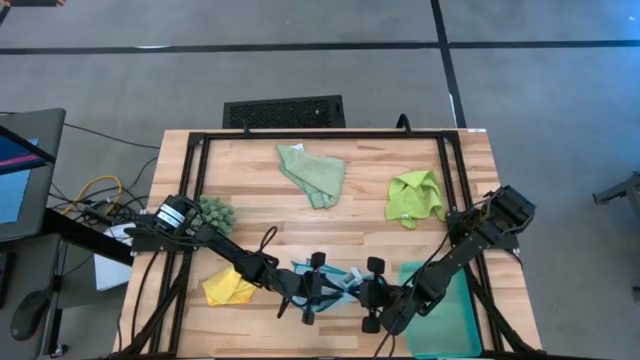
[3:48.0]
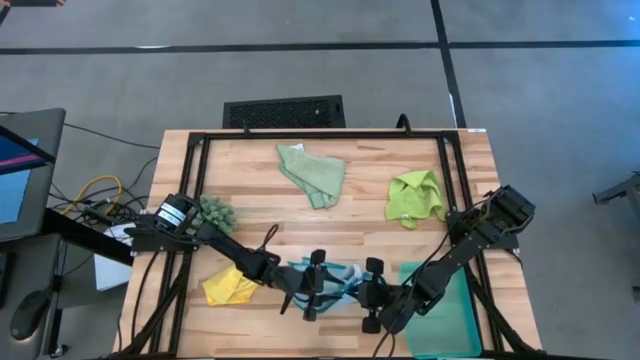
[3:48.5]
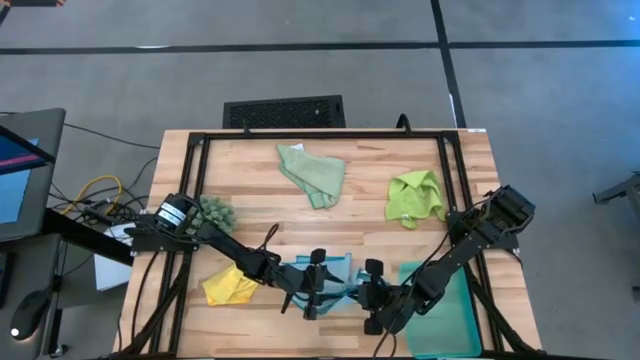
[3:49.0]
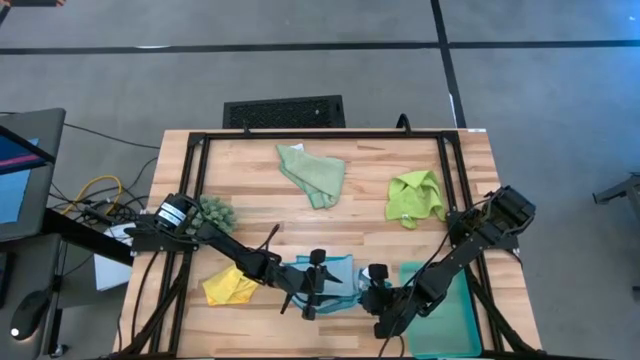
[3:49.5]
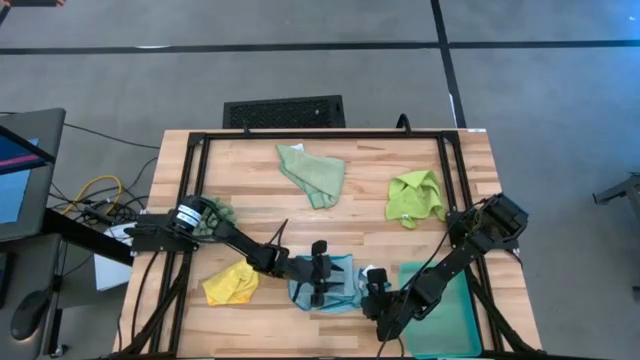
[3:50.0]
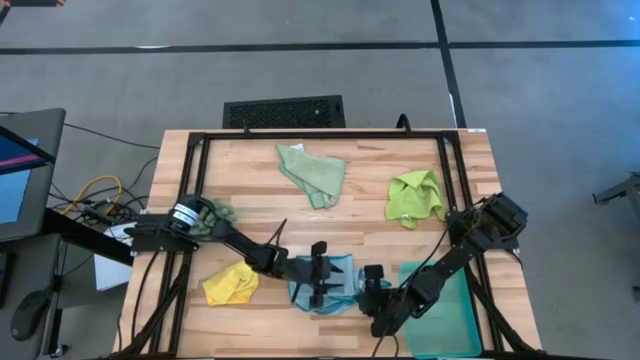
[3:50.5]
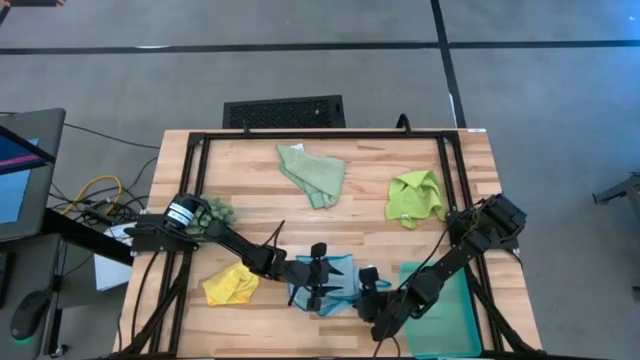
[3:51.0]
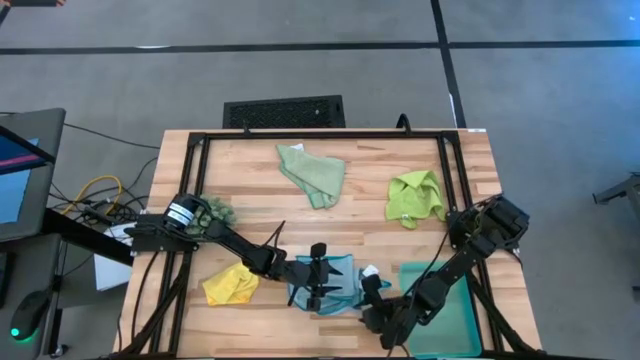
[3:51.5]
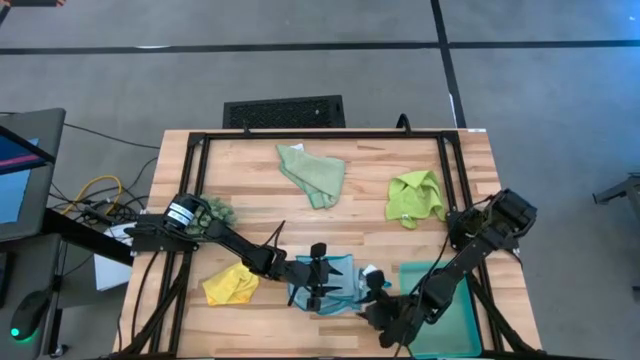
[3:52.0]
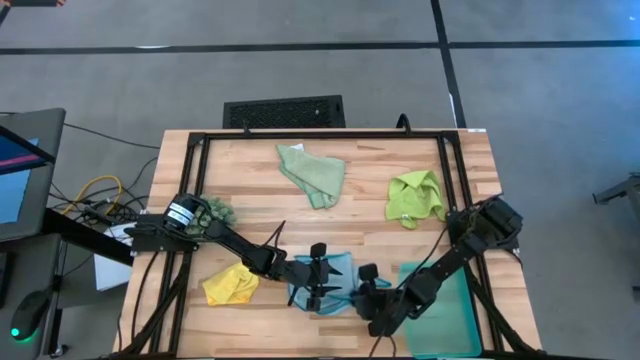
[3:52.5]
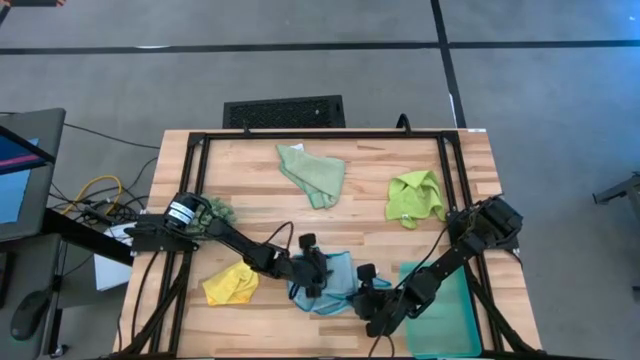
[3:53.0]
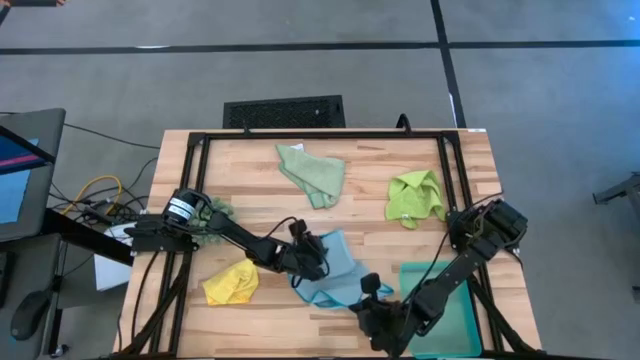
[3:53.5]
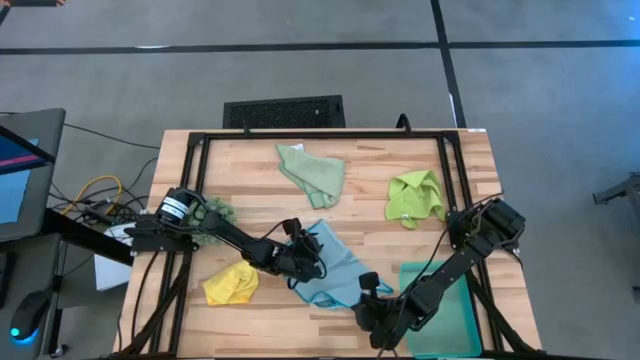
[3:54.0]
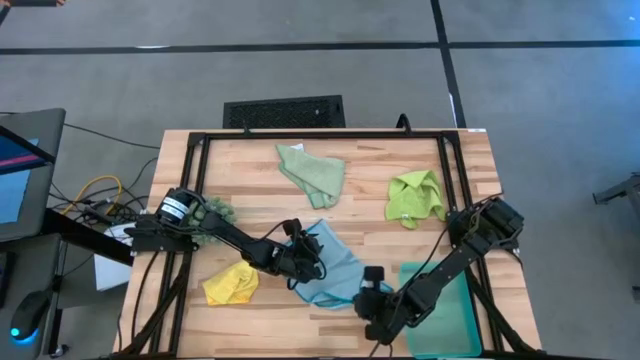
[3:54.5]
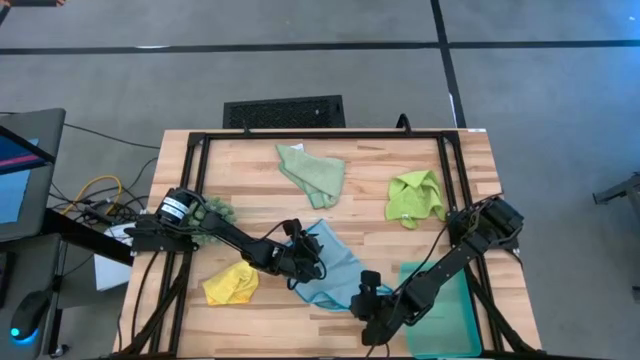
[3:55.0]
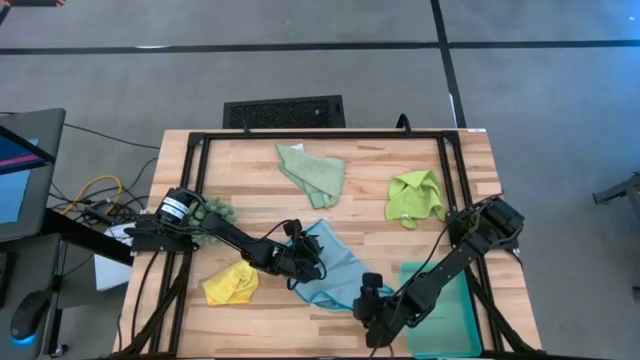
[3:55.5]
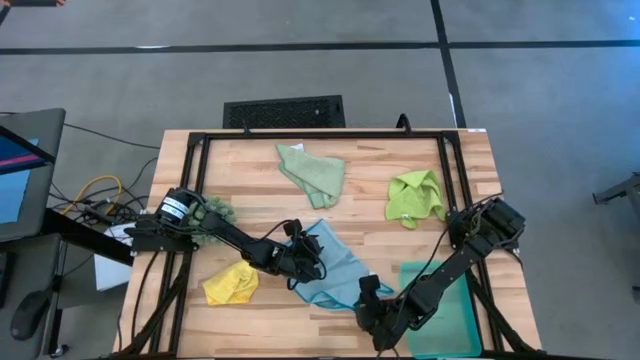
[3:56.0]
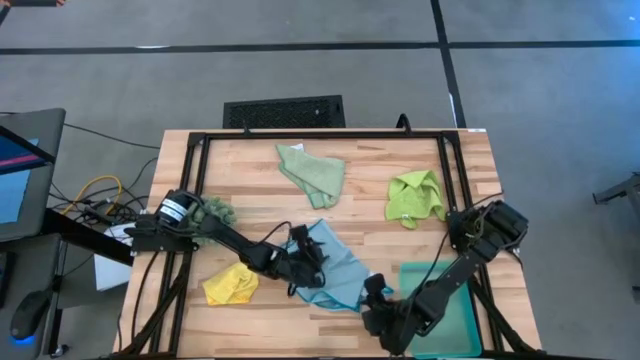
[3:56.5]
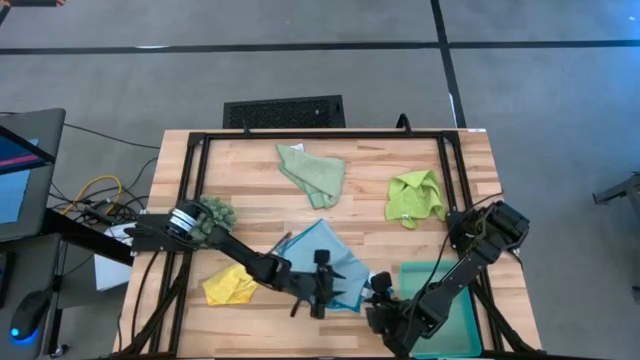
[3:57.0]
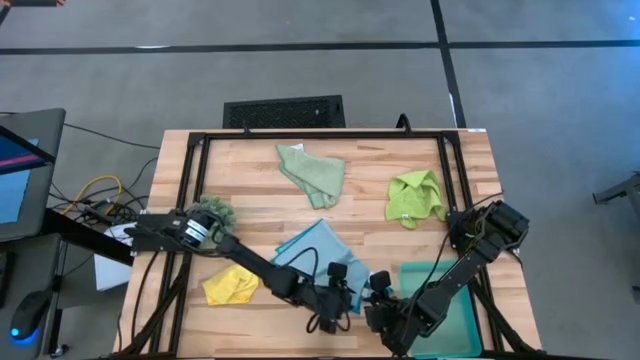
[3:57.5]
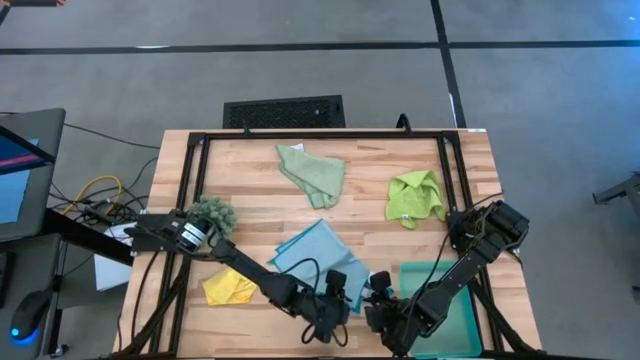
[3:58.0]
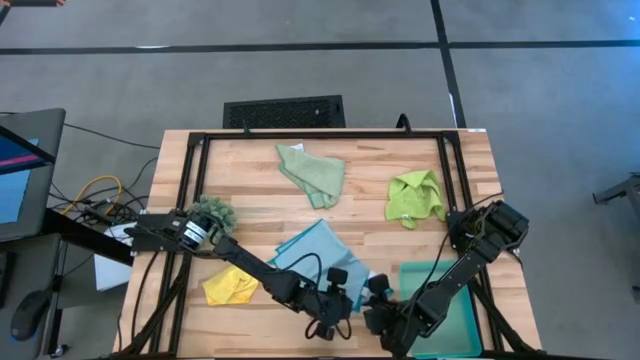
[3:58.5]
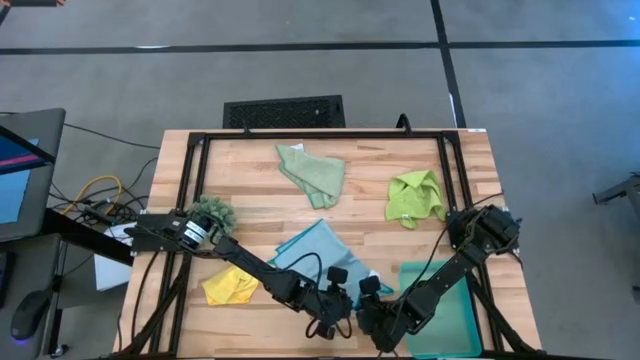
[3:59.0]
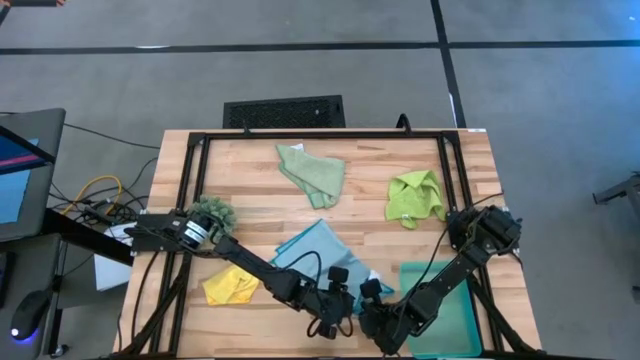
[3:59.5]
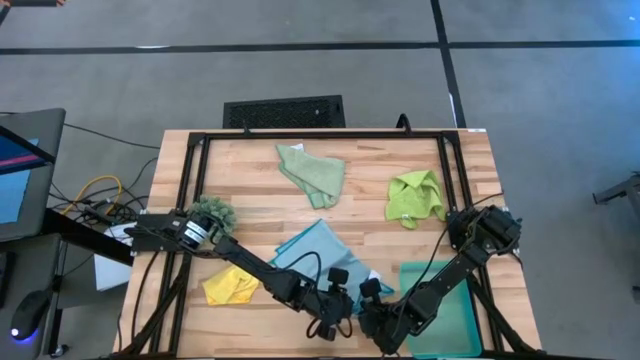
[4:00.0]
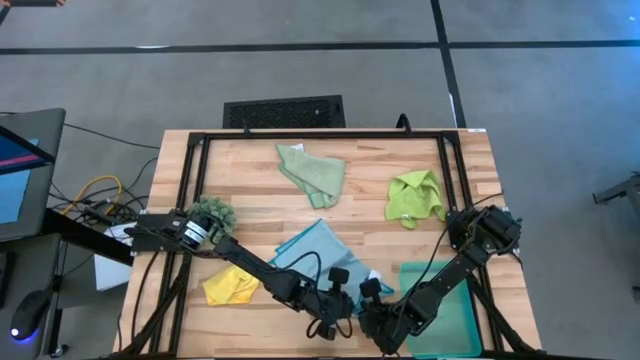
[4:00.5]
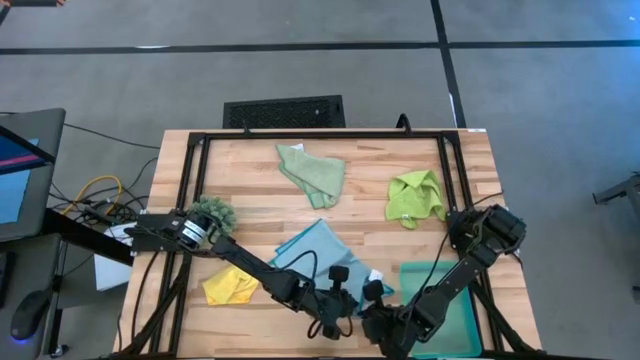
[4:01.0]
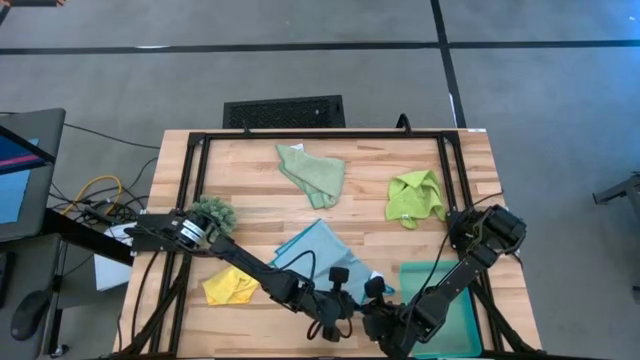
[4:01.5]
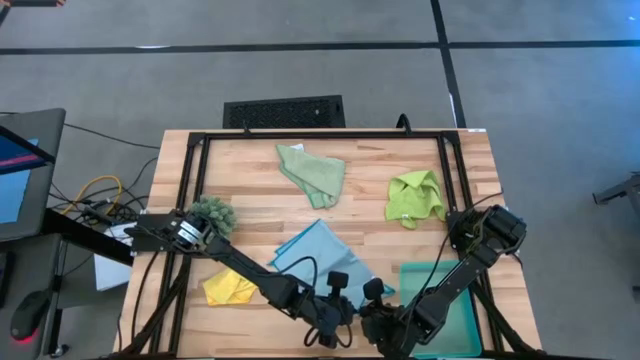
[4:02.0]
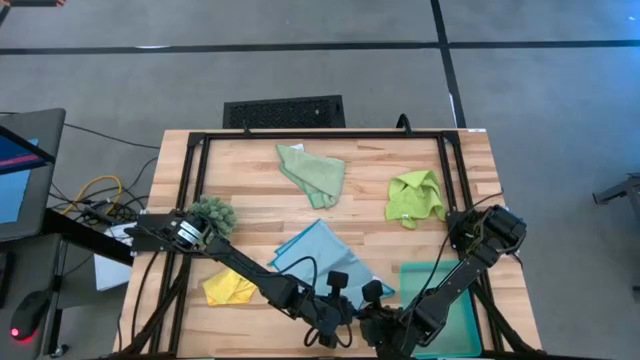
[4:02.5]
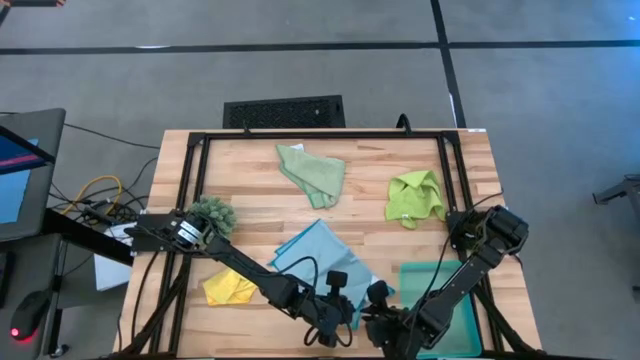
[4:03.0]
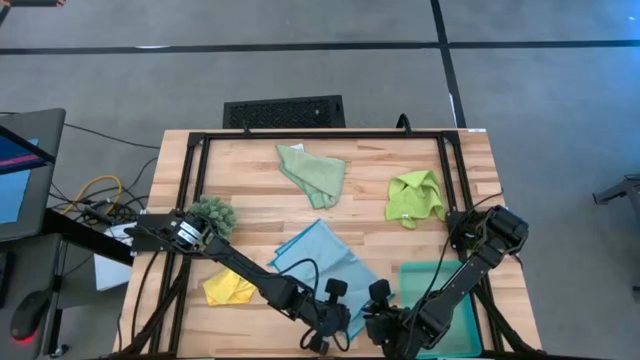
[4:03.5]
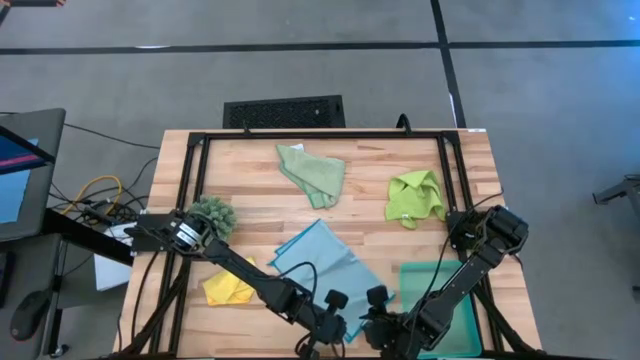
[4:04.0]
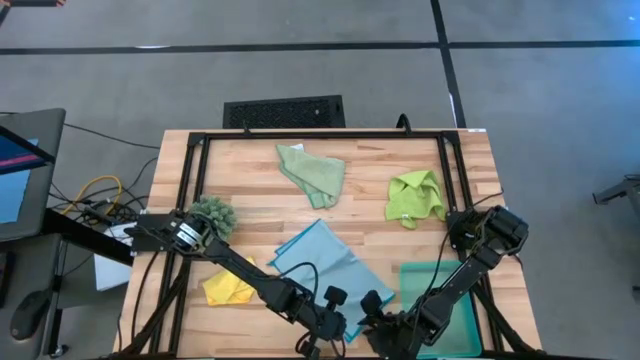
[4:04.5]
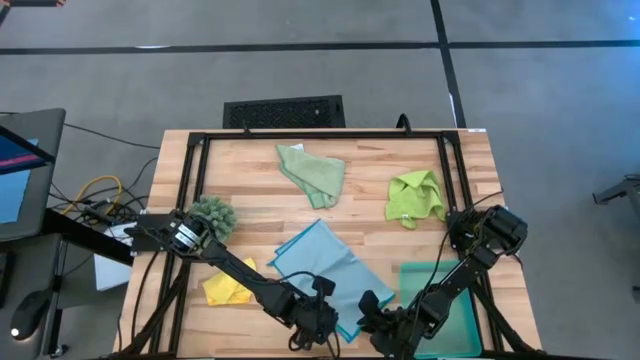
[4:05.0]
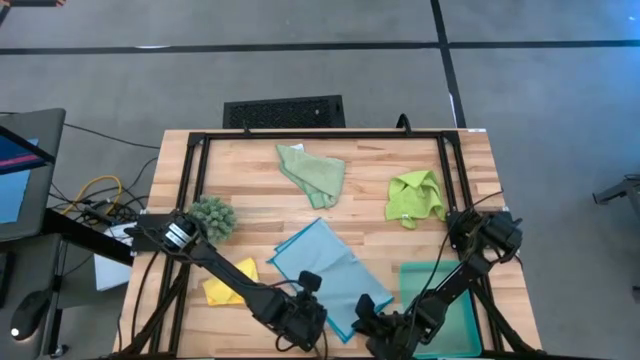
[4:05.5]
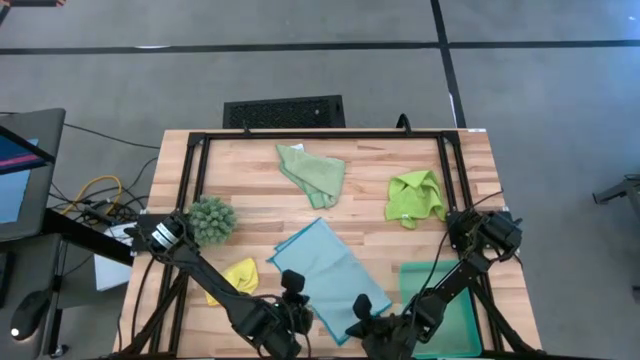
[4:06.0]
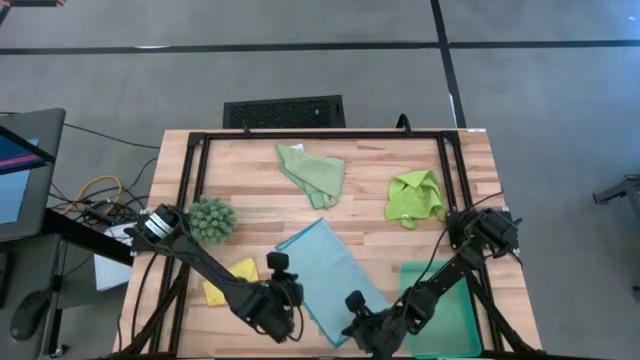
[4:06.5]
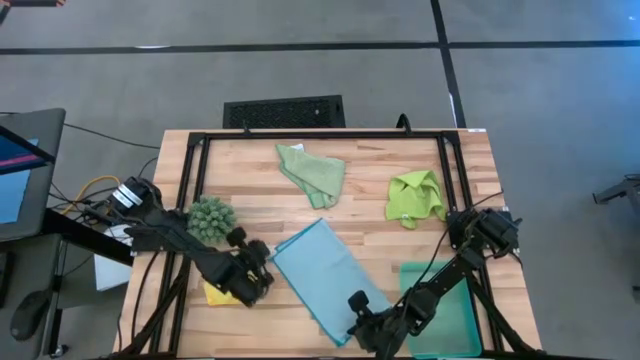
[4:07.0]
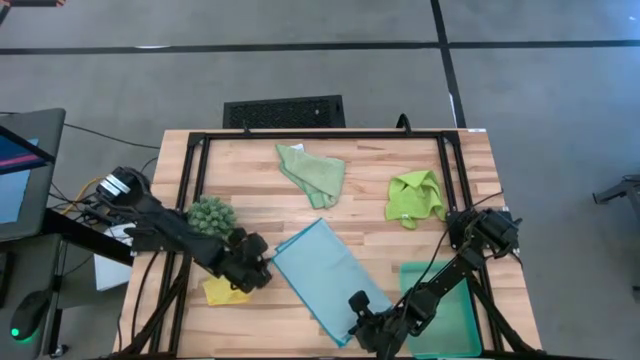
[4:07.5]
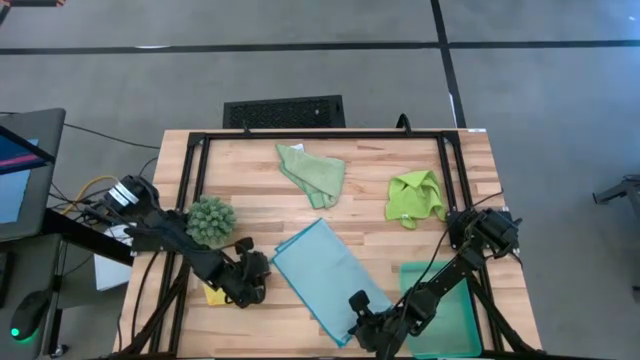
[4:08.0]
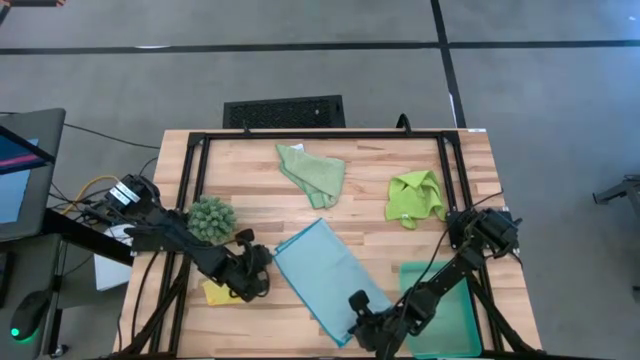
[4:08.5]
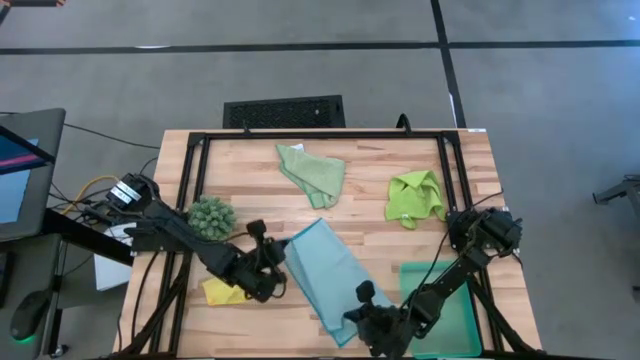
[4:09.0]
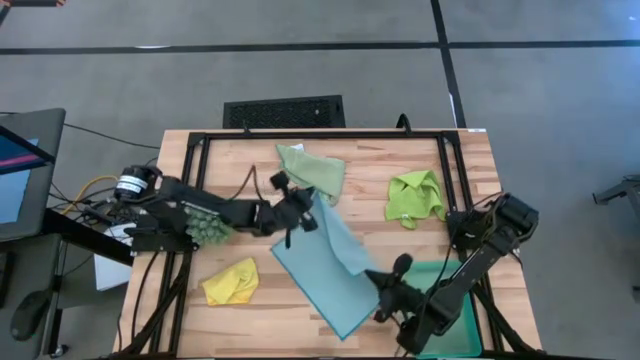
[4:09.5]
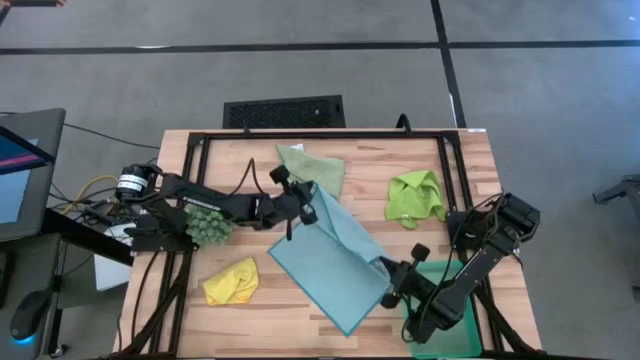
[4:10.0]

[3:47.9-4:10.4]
Task: Fold microfiber towels
Fold the blue microfiber cloth
